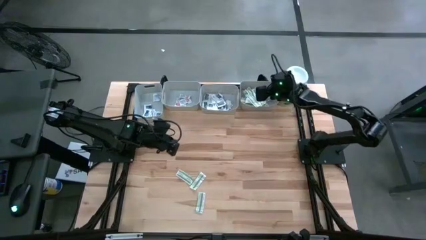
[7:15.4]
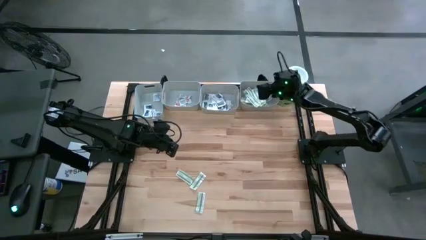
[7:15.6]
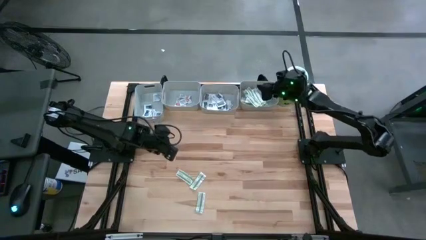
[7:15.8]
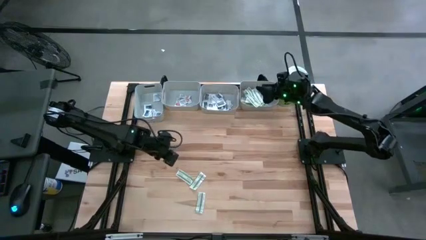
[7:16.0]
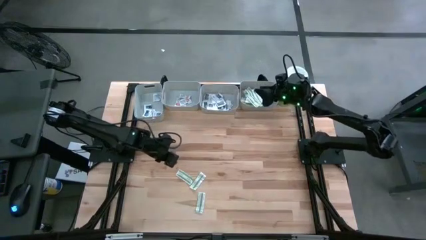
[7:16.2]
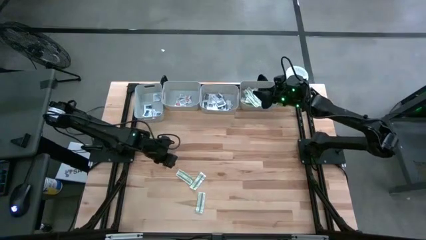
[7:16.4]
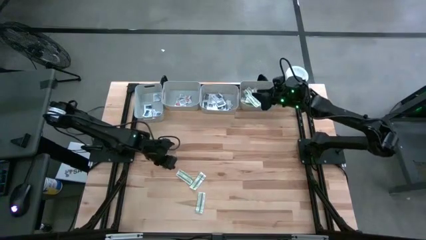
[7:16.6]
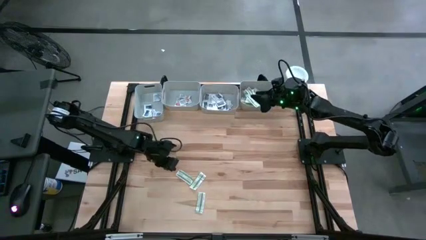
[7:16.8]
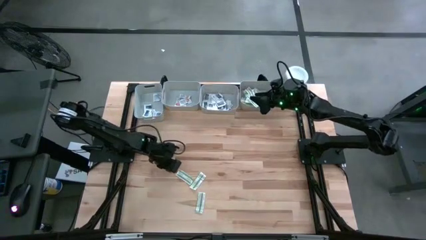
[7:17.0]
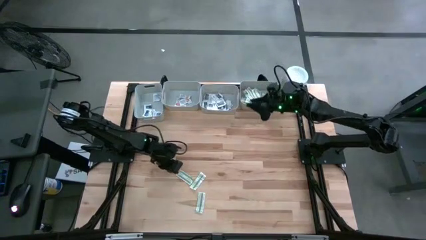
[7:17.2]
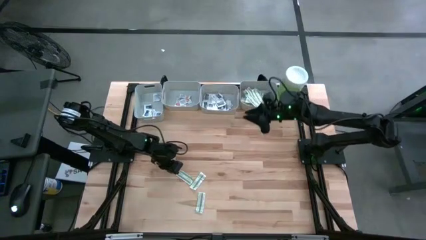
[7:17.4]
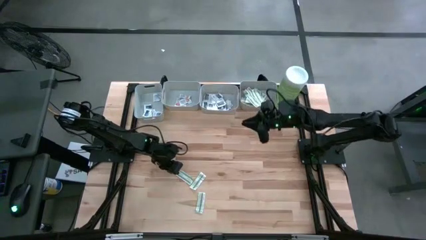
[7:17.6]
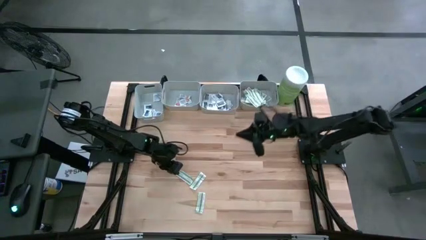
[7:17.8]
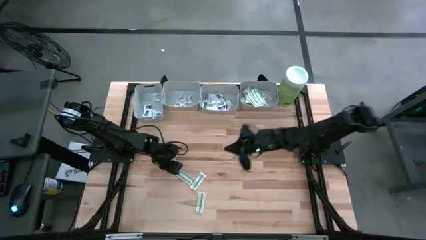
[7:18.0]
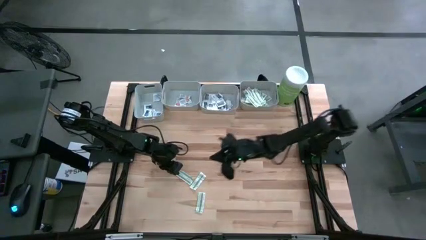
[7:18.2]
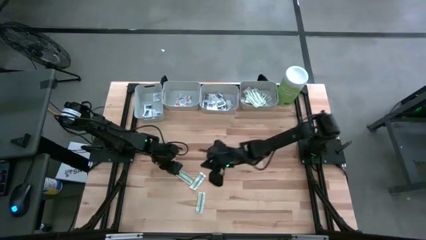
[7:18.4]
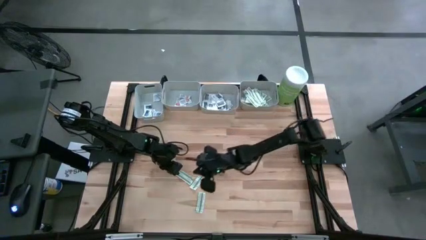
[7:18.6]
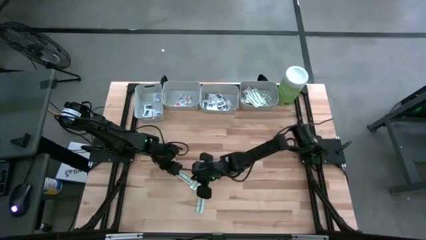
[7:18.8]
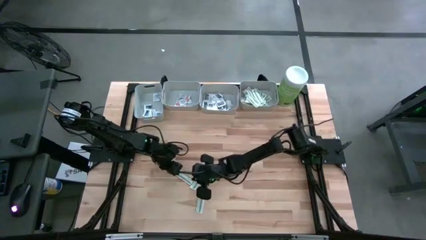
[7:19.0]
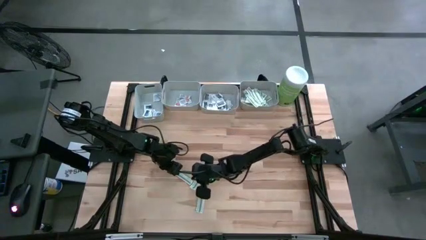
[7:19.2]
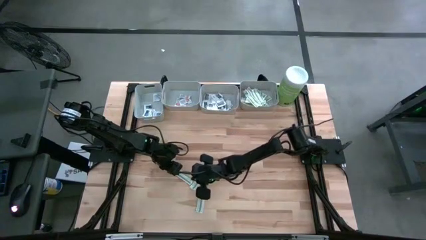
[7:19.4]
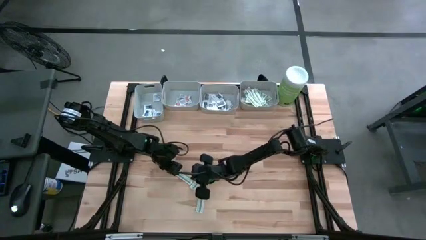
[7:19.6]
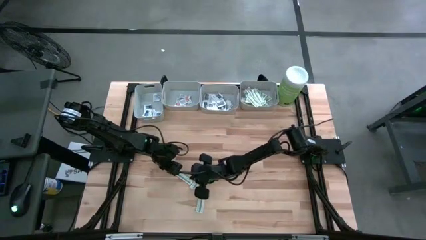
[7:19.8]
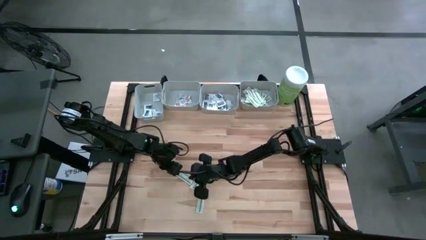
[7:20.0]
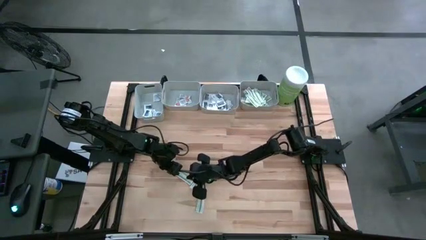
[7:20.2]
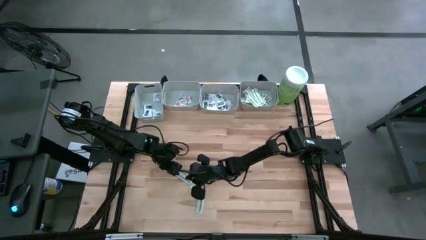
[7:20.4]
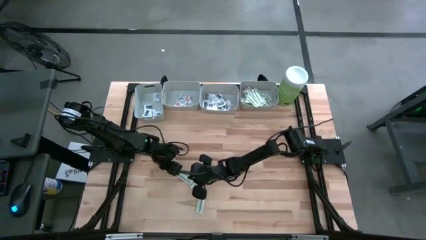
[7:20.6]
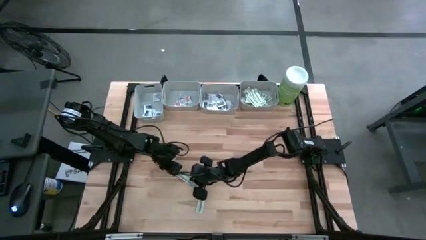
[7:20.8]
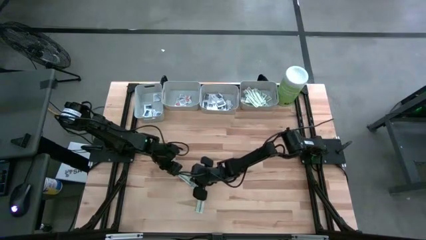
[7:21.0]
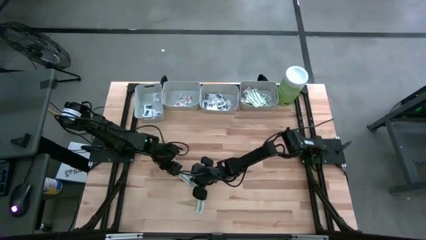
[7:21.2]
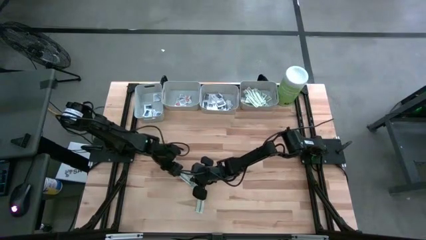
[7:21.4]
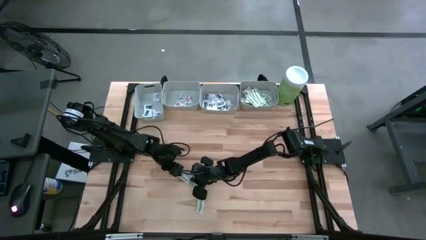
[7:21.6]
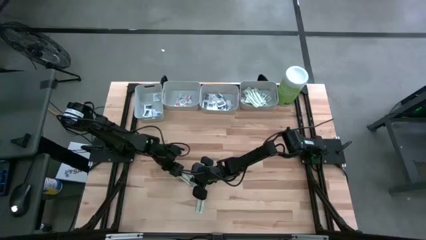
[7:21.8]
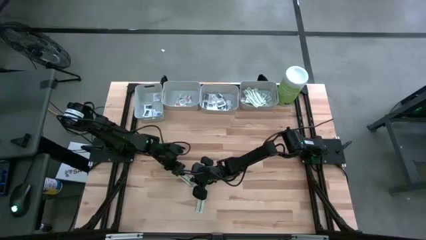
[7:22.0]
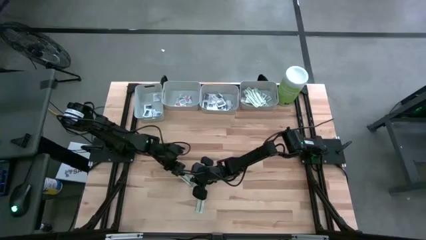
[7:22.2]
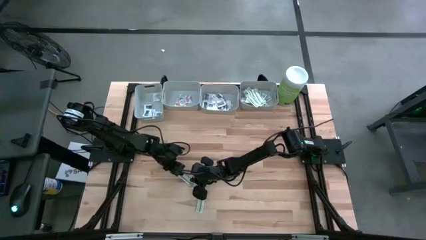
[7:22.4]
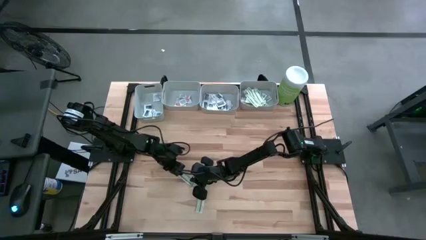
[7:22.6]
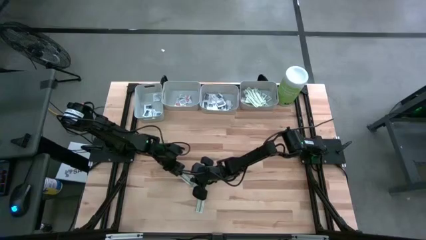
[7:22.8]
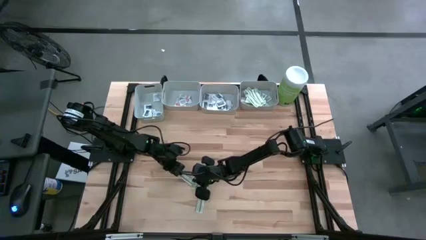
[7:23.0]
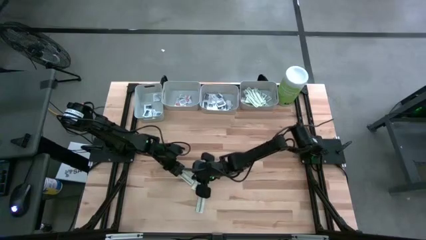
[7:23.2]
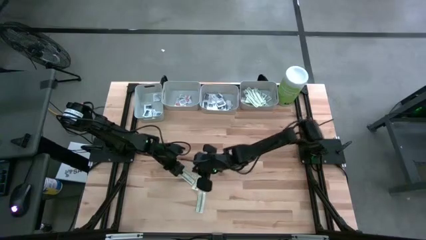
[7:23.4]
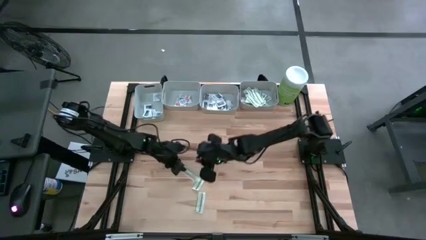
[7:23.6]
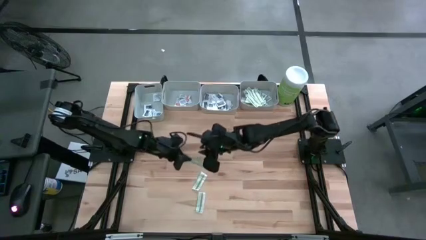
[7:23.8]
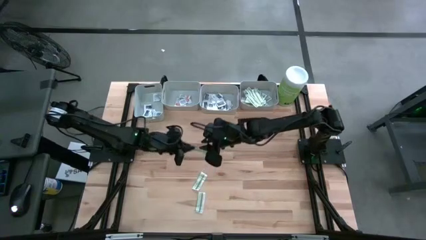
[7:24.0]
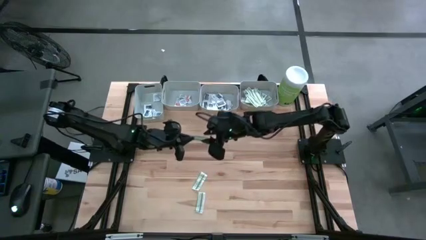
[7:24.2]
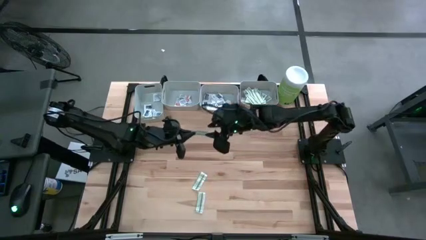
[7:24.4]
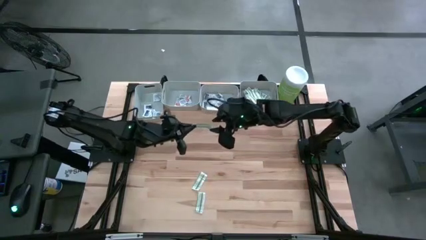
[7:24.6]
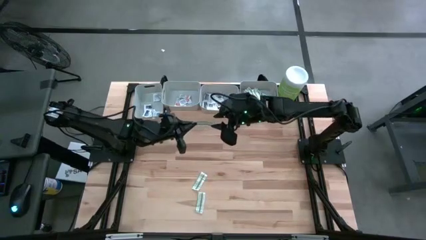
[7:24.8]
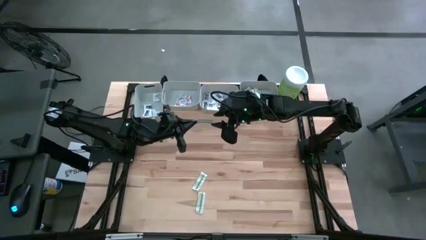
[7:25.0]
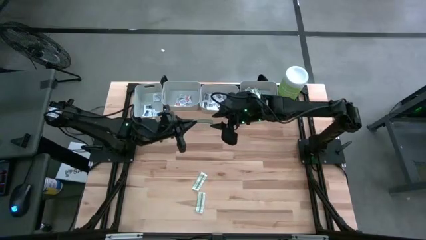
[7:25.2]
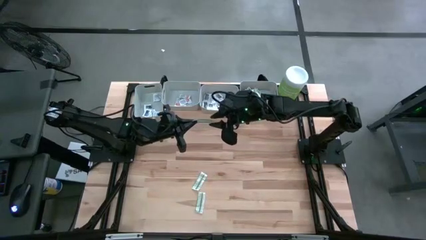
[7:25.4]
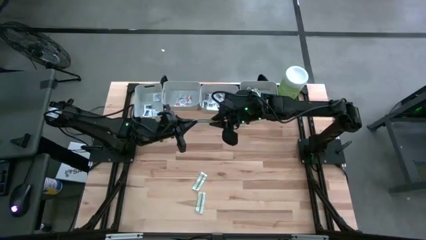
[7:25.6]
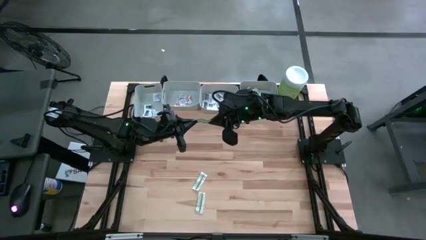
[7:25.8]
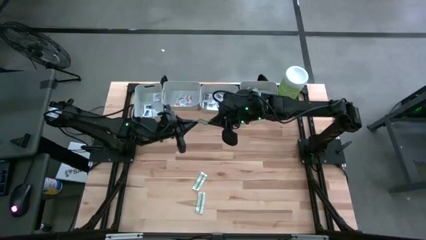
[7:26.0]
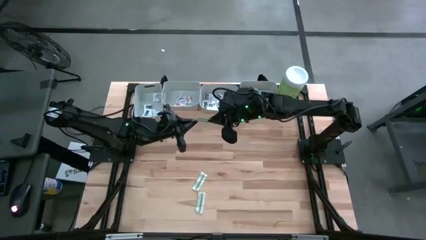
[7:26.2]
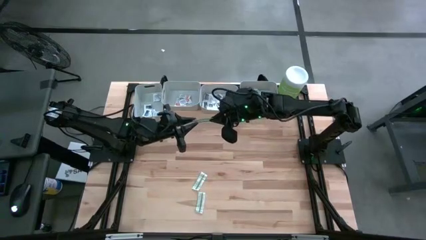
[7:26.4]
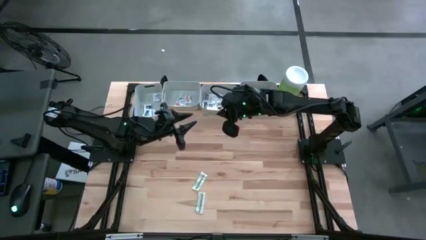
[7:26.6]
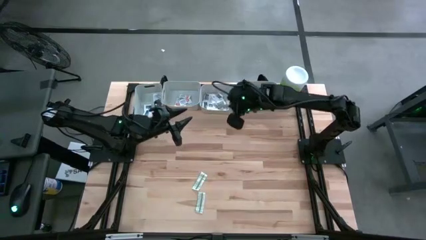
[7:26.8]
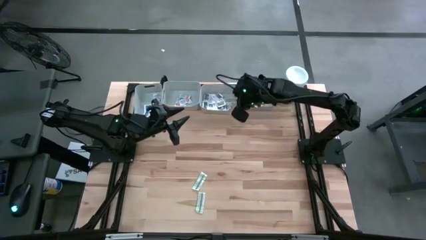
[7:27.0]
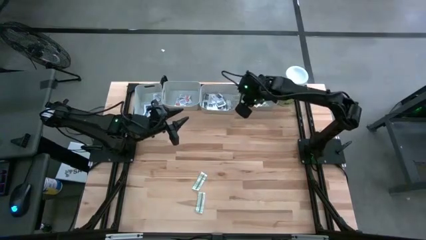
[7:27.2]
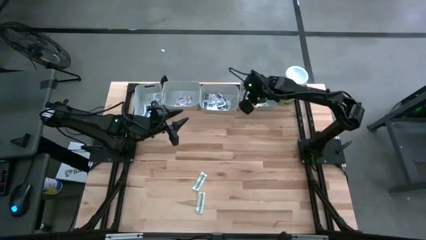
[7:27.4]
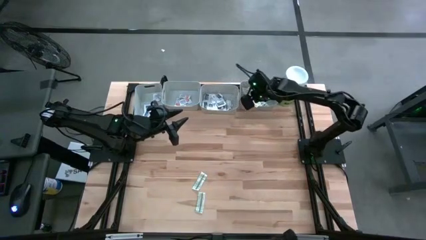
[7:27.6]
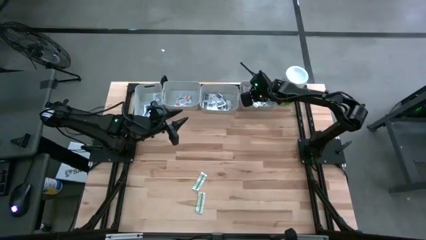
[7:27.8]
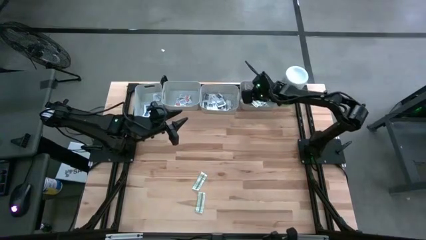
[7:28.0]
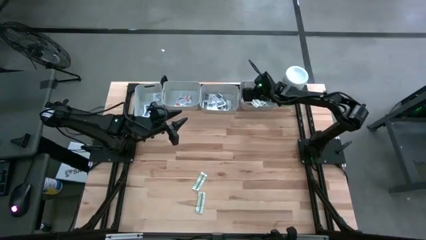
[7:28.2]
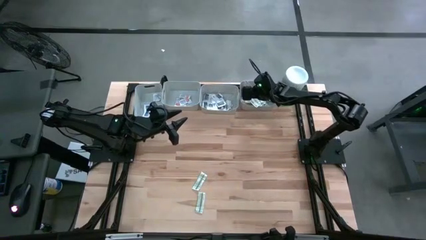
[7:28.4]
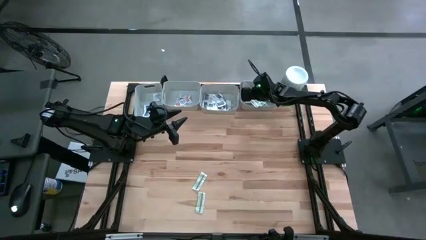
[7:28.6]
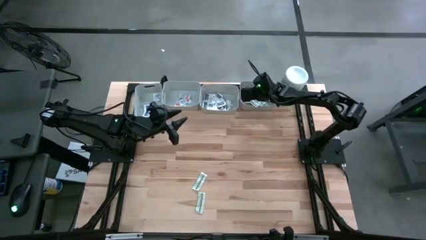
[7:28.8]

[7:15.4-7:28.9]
Task: Pick & Place First Aid Supplies
Put the green bandage into the right gray bin

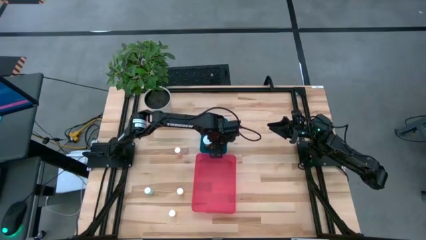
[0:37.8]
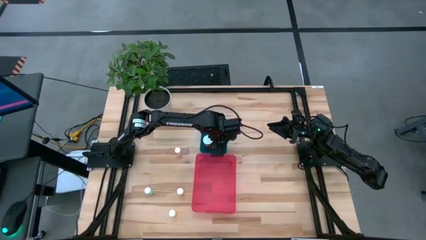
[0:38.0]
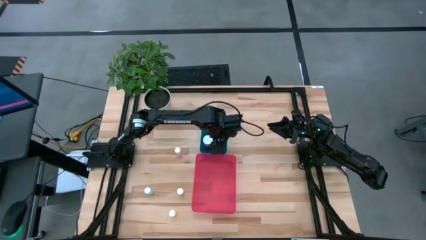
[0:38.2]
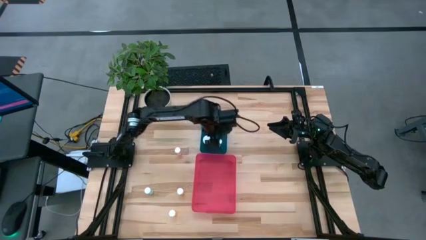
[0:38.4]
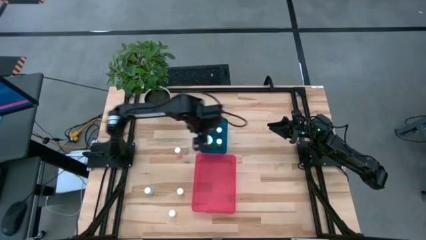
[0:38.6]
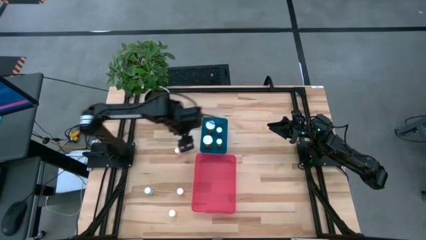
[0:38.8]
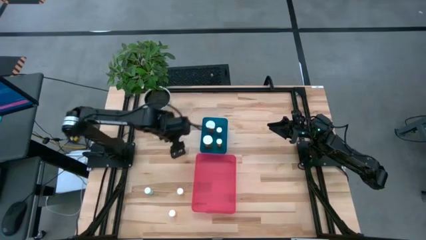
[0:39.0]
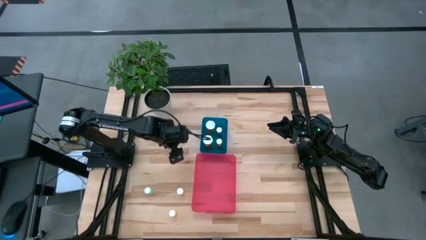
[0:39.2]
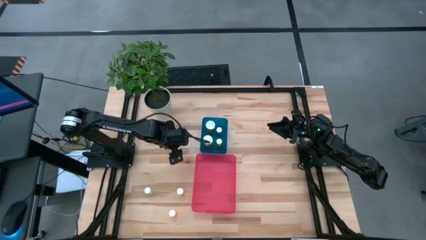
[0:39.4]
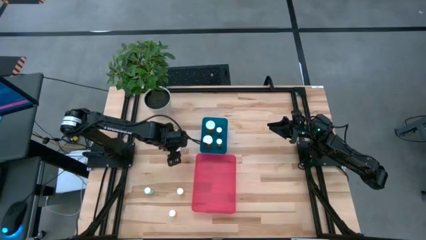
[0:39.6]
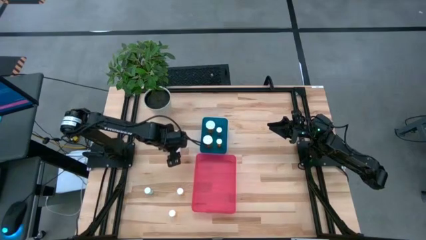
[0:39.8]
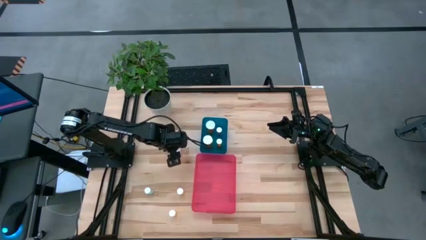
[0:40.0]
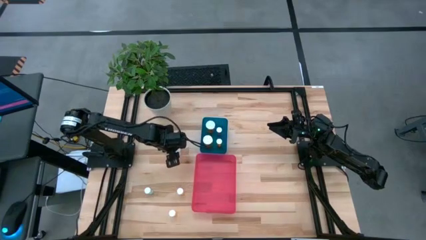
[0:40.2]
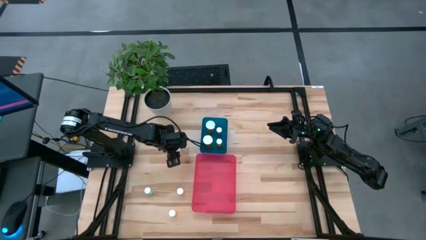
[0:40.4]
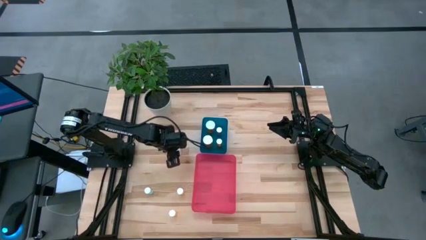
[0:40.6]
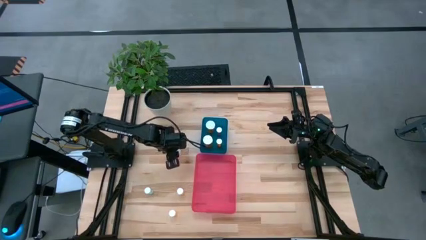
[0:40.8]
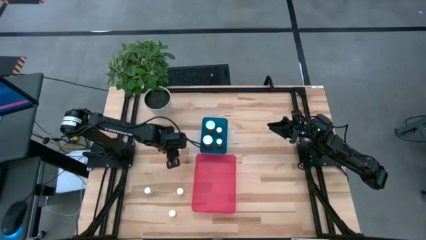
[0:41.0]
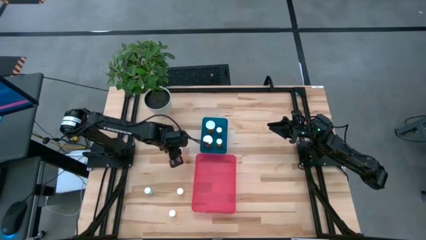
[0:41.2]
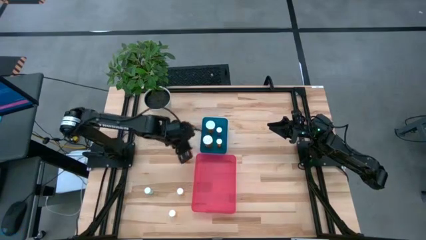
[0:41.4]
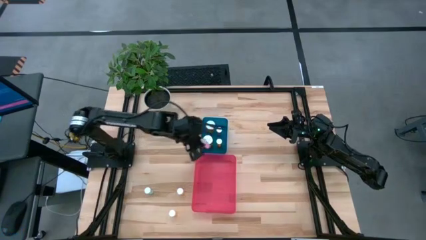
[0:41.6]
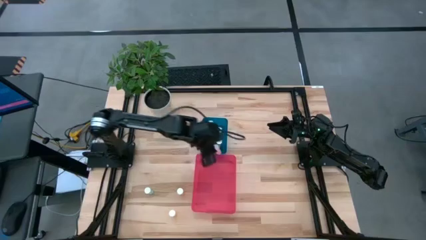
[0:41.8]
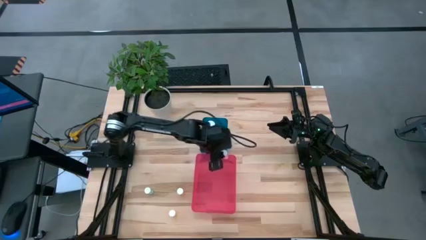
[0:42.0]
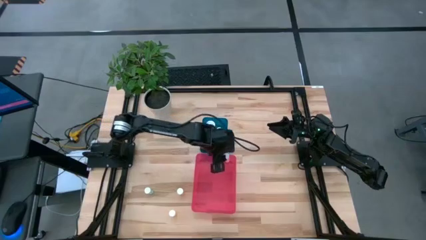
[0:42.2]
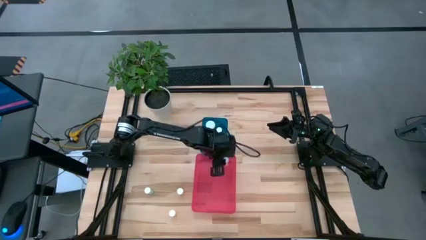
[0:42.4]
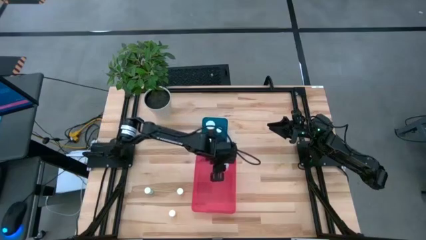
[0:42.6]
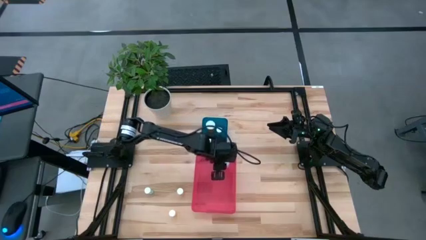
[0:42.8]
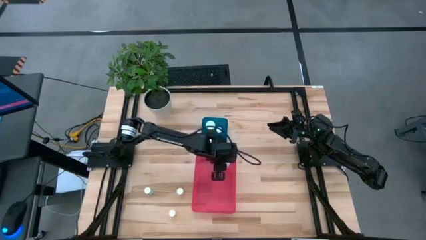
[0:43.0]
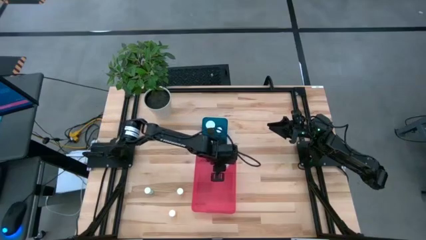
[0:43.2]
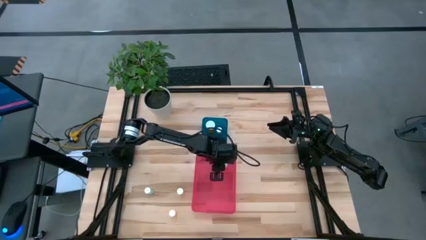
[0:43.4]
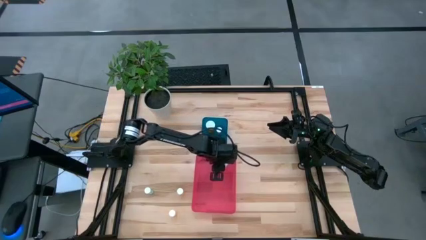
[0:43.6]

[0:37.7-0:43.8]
Task: Pick and place medicine bottles into bin by pill shape (circle, oval)
Put the pink tablet bottle into the red bin
